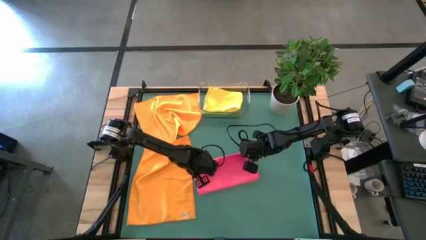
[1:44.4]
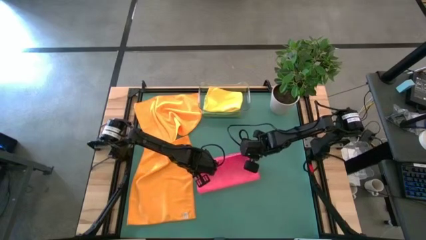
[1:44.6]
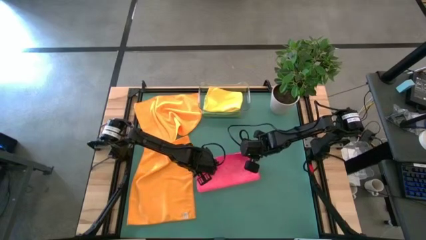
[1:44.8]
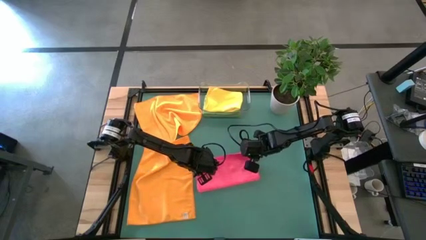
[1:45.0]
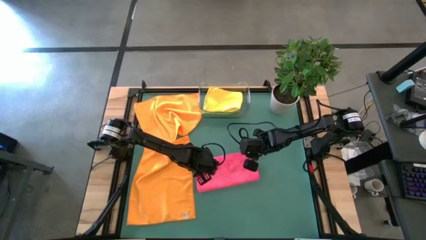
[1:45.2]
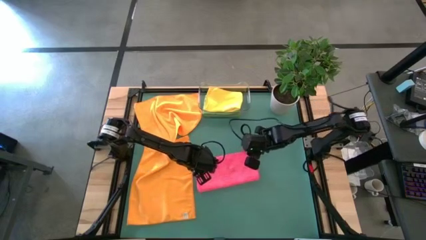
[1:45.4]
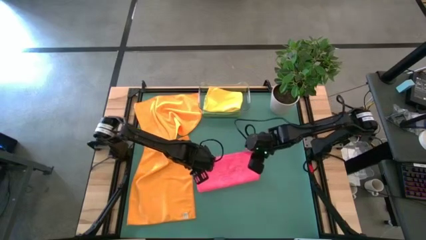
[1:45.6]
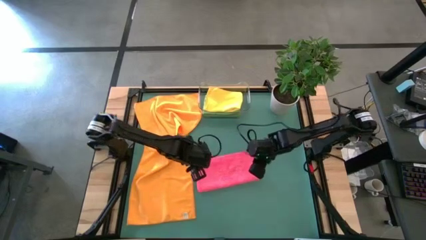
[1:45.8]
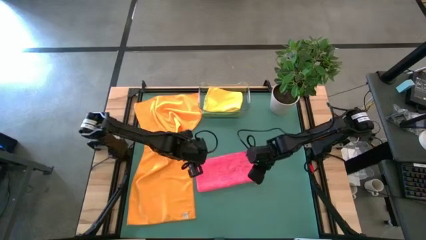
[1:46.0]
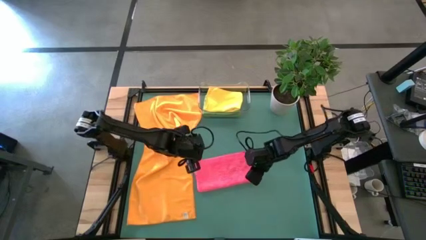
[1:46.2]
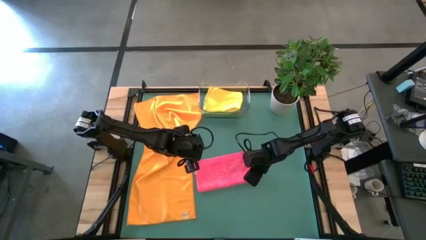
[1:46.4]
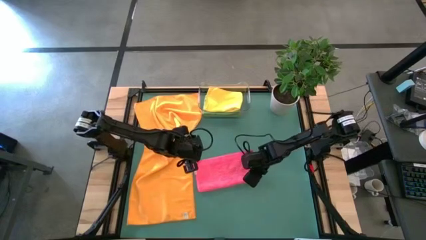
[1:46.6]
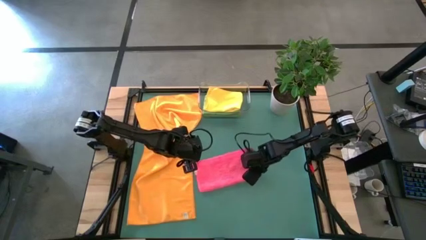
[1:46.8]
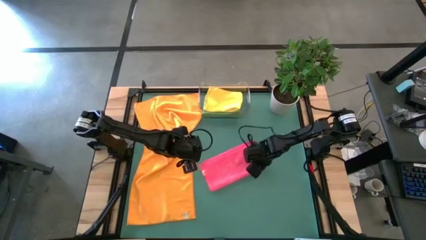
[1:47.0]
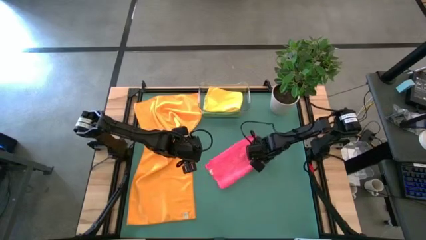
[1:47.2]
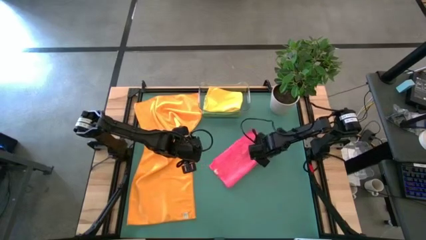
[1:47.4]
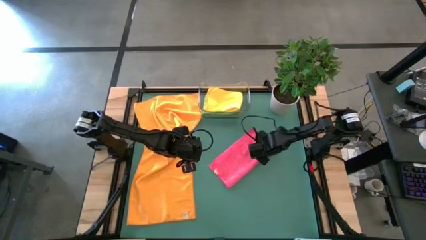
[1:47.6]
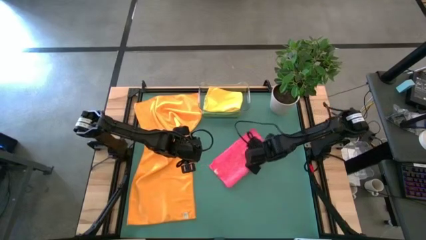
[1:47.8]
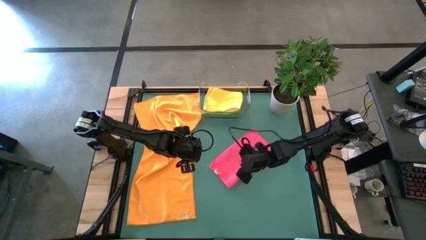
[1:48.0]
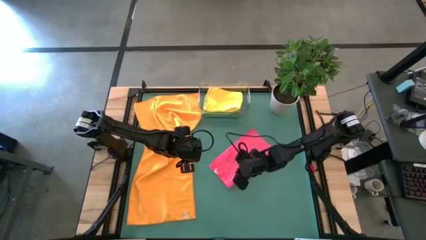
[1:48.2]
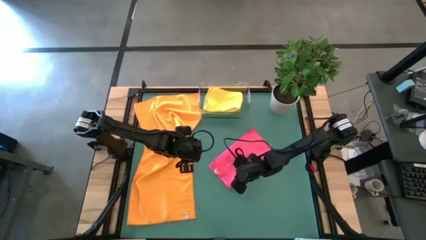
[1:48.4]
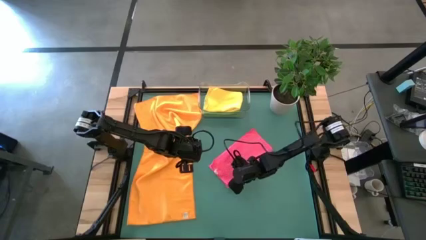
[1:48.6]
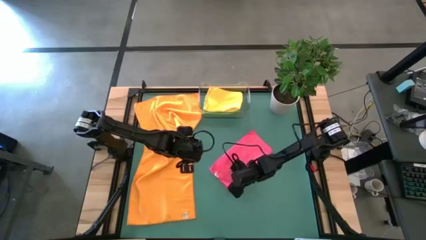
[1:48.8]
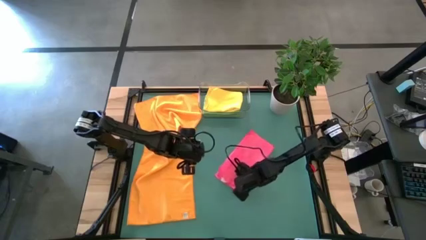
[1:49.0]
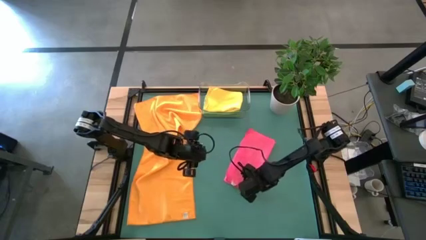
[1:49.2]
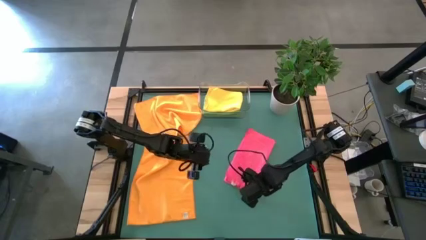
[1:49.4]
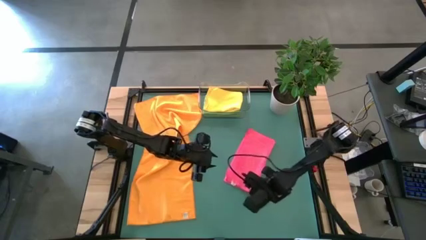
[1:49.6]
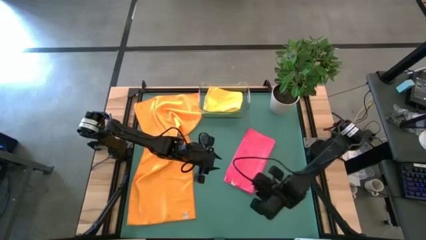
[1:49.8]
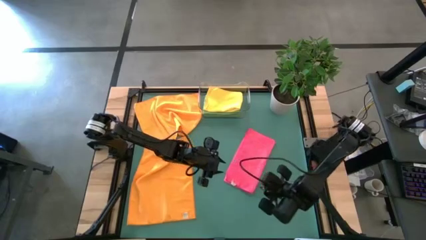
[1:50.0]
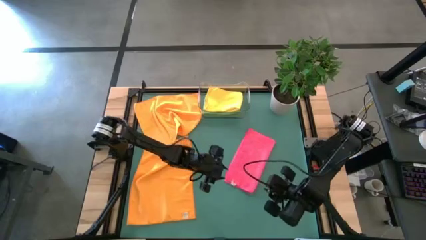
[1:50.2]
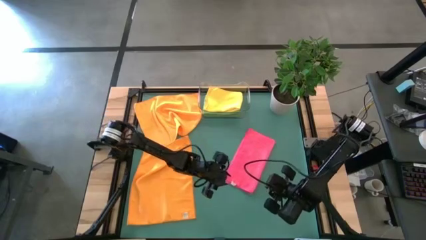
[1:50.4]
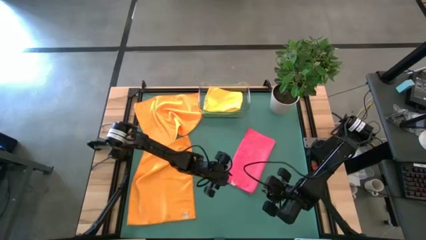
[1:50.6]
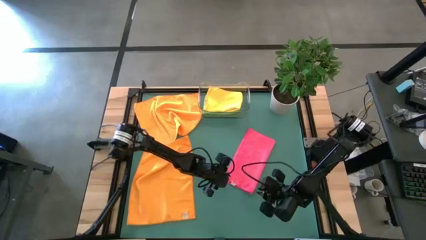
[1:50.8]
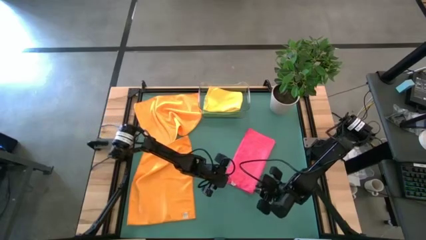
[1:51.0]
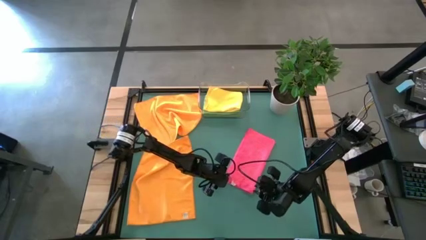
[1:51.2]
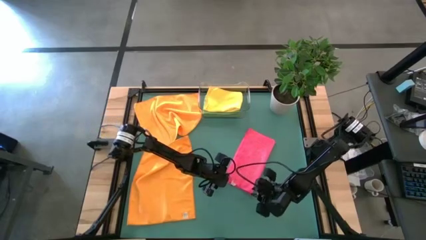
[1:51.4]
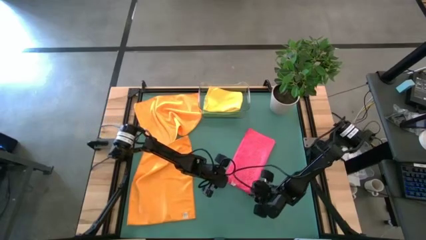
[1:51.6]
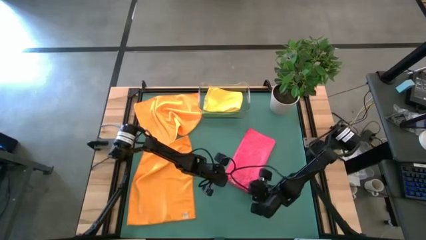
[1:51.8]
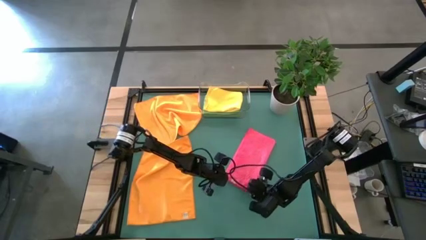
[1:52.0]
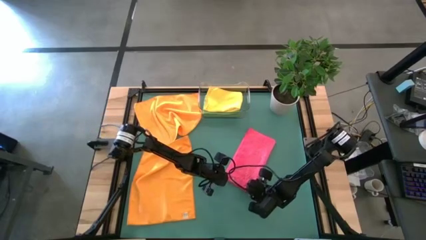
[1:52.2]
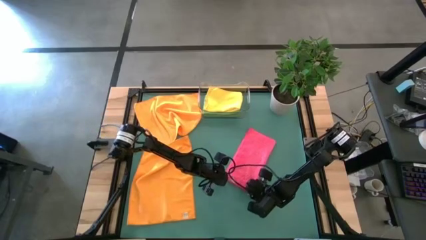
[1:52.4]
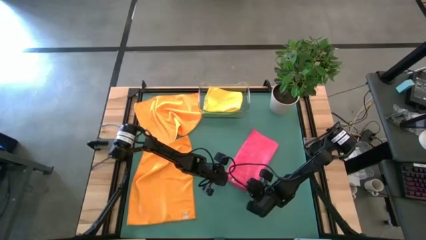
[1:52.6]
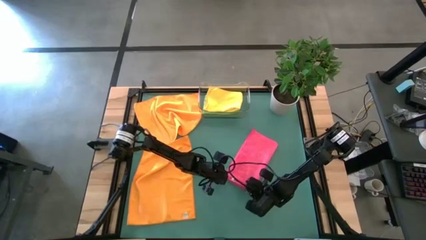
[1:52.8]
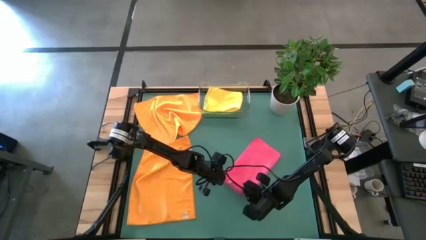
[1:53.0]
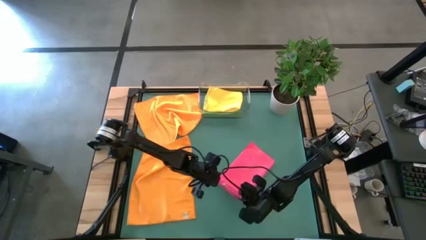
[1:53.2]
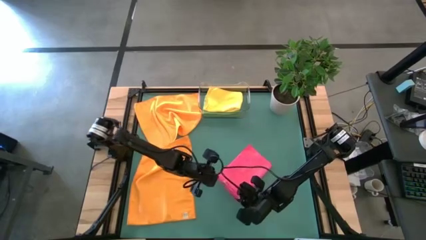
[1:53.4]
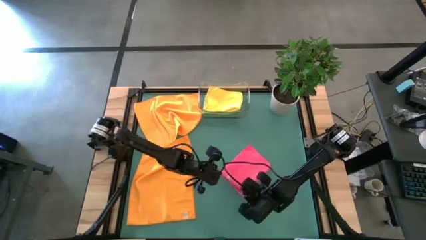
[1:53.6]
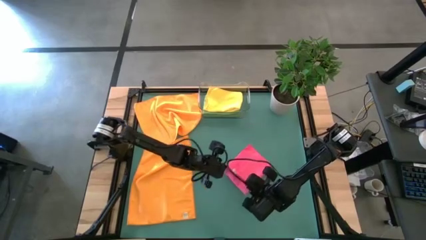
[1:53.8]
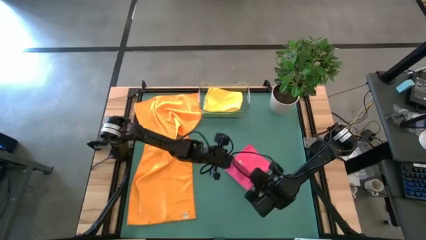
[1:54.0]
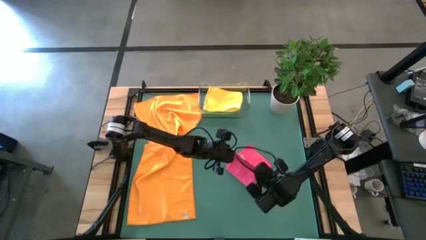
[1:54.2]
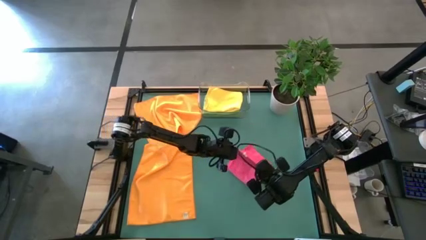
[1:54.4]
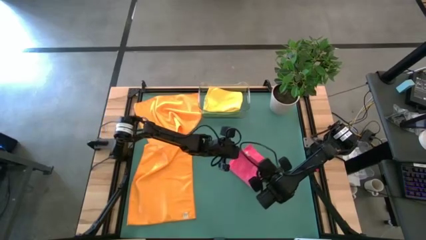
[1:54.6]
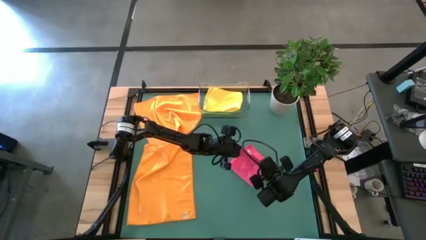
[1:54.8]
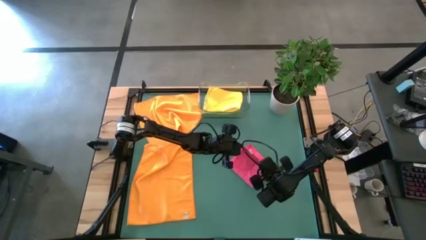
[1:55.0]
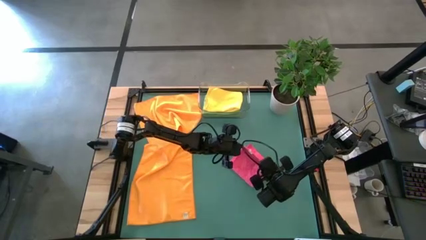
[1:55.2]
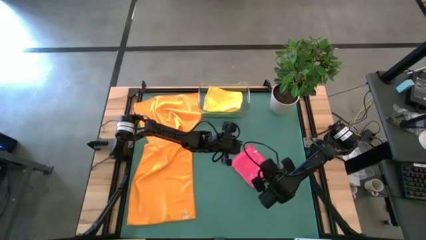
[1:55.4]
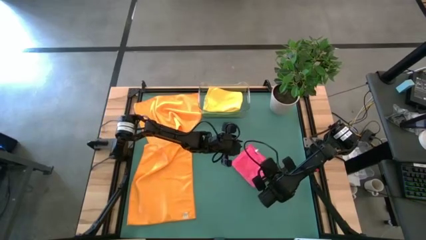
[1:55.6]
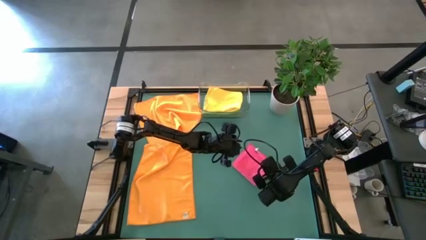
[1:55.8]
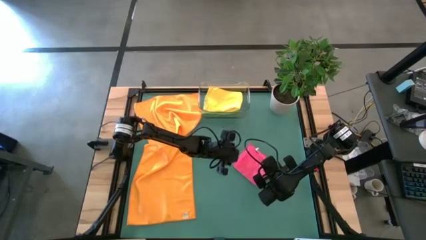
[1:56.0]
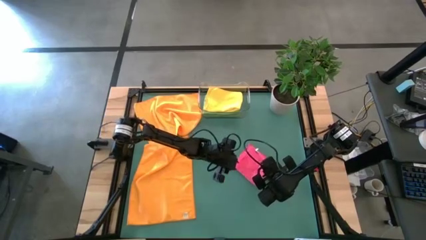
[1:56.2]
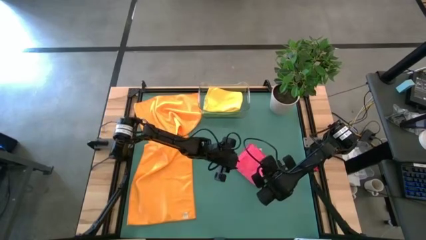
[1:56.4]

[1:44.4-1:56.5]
Task: Fold microfiber towels
Fold the pink towel

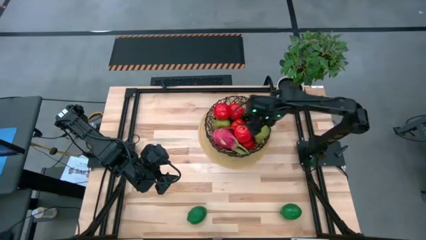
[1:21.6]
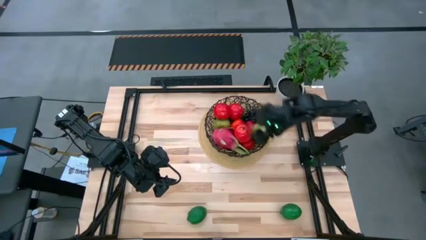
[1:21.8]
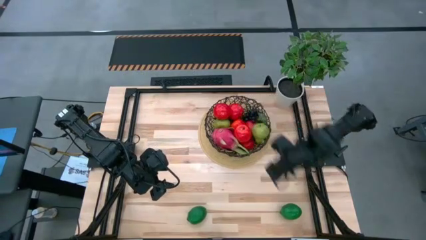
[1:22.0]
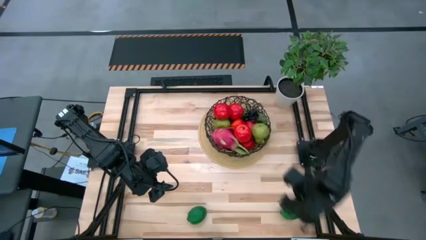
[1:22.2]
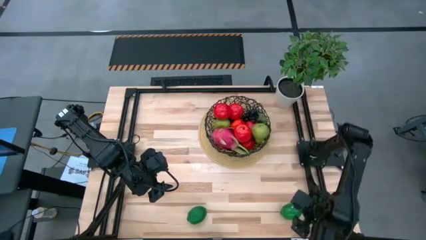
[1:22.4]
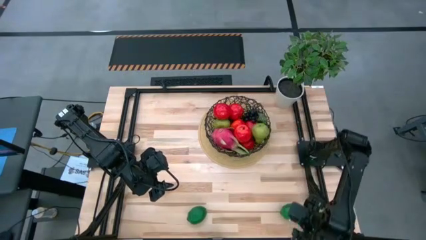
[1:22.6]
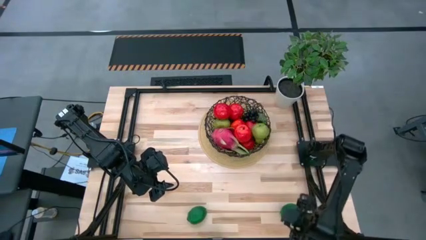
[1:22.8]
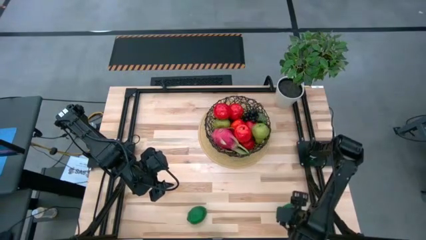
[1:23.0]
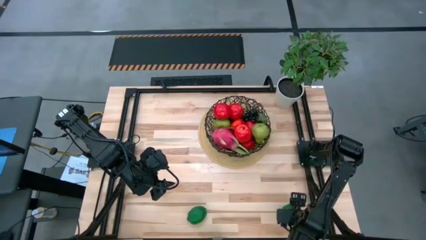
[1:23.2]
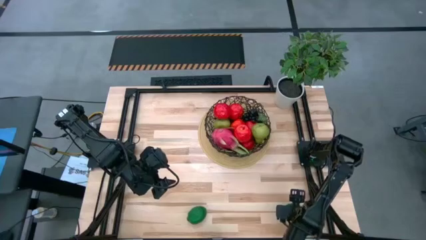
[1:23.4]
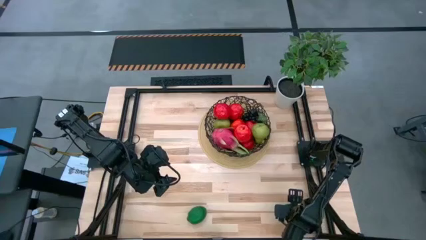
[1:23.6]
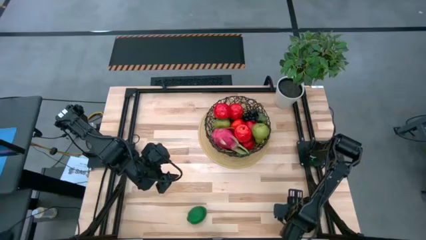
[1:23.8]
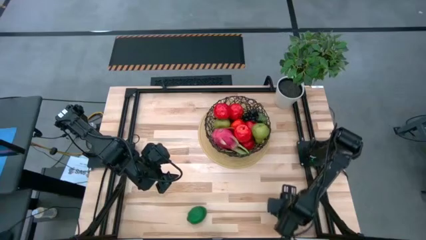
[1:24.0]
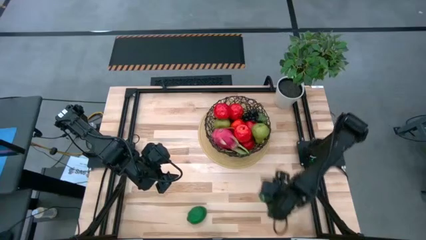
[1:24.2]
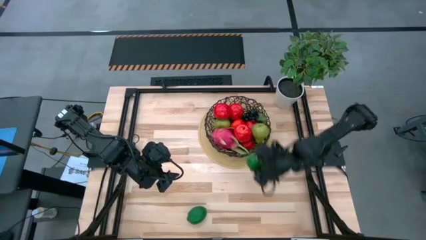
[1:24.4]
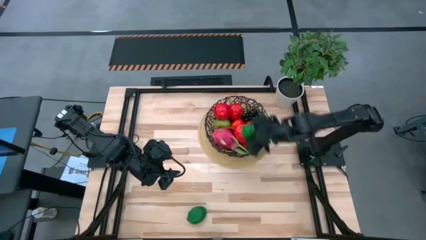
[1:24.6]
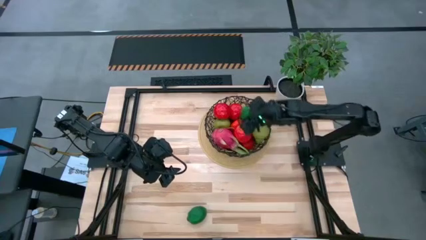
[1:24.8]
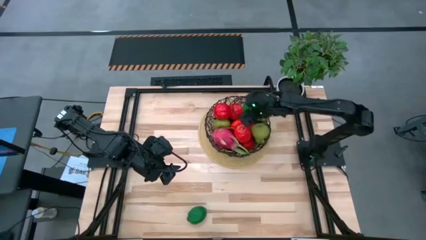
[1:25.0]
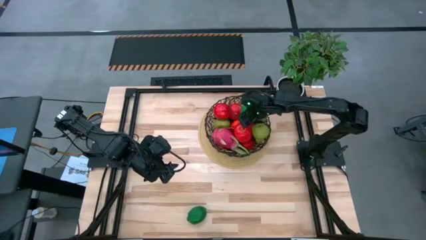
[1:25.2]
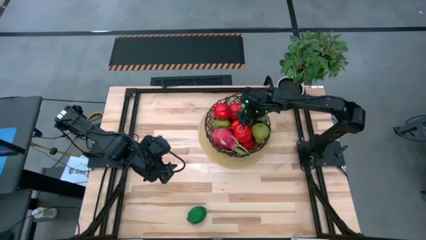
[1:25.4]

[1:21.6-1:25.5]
Task: Build produce basket
Put the right green lime into the black basket

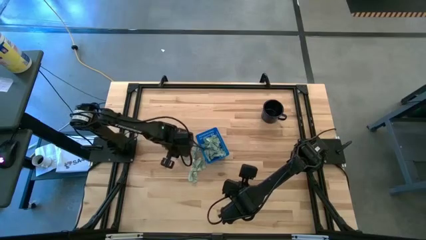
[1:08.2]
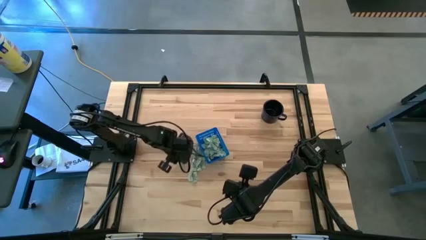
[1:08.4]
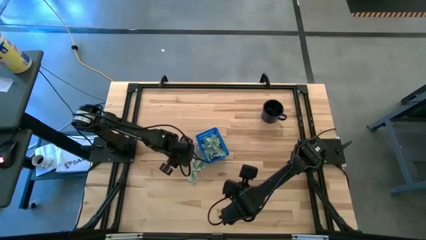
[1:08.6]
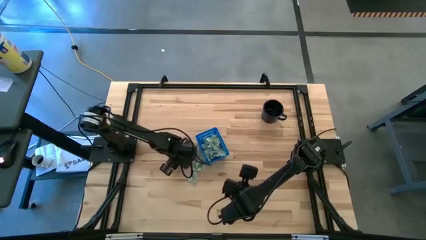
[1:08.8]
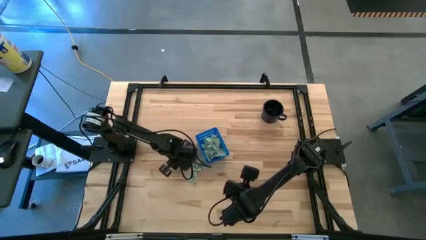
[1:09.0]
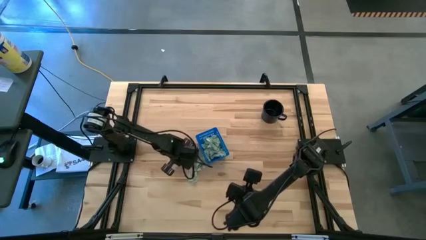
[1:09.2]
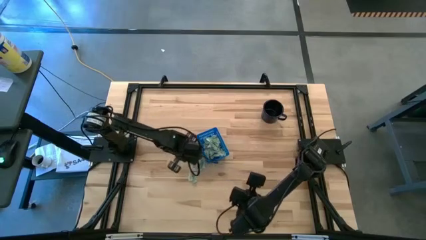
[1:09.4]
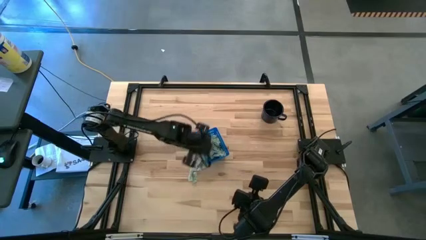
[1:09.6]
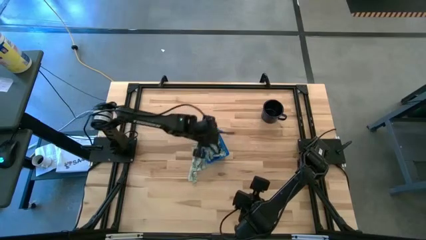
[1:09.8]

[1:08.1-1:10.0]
Task: Pick and place Stevia / Truvia into bins
Put the stevia packet into the basket
